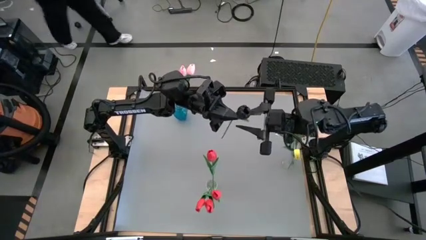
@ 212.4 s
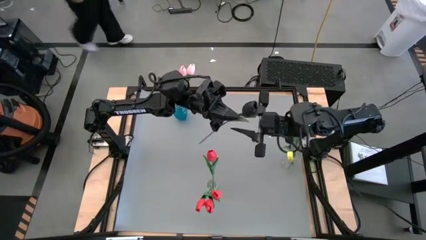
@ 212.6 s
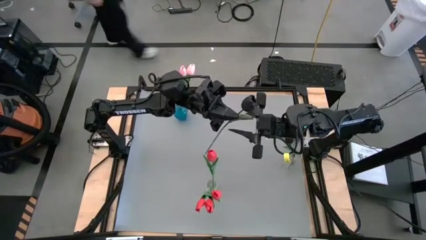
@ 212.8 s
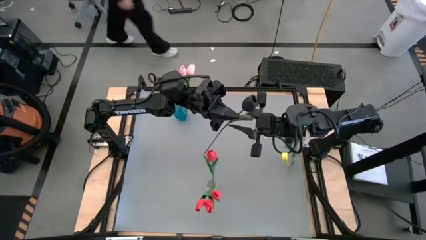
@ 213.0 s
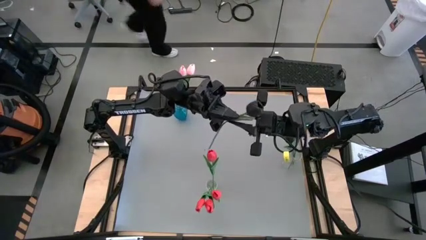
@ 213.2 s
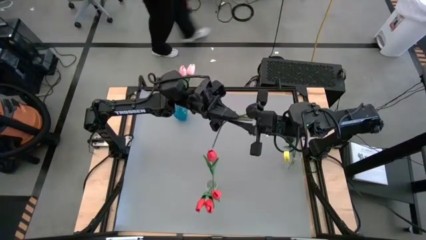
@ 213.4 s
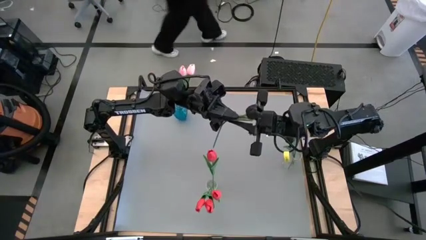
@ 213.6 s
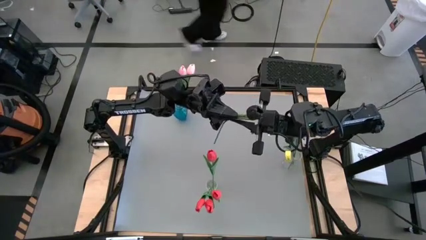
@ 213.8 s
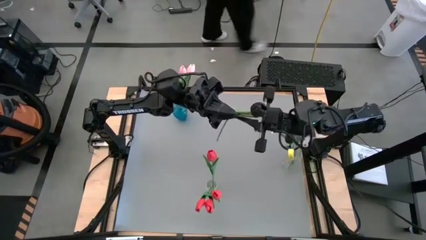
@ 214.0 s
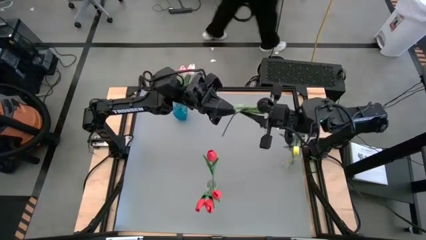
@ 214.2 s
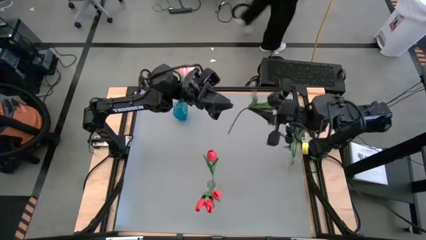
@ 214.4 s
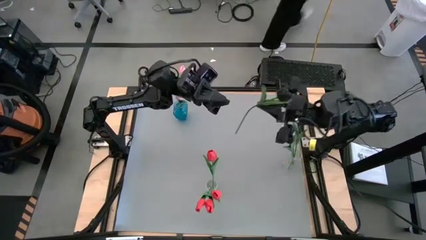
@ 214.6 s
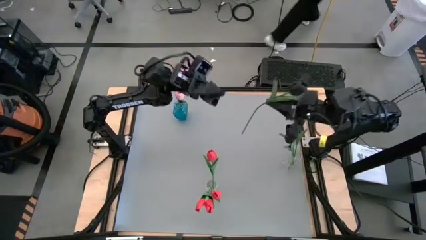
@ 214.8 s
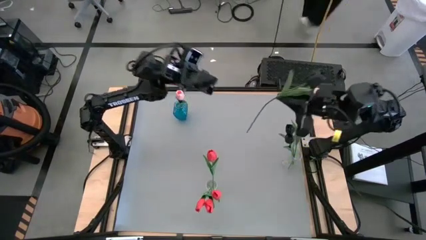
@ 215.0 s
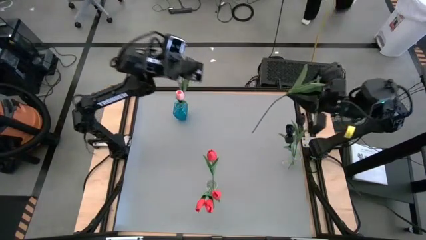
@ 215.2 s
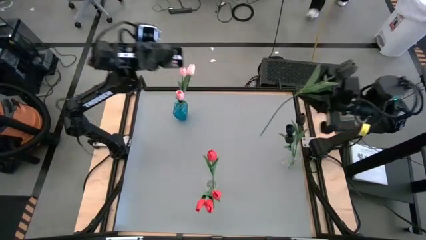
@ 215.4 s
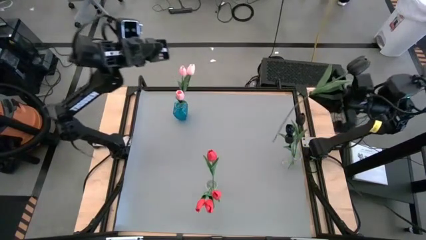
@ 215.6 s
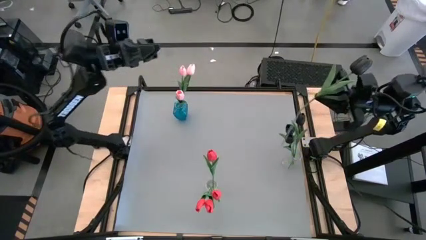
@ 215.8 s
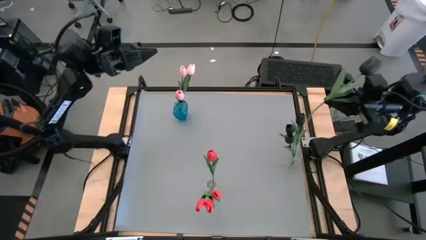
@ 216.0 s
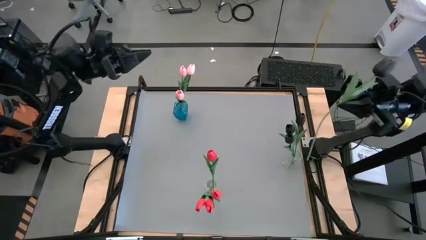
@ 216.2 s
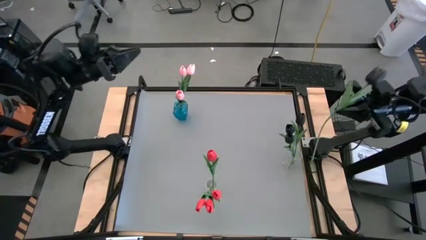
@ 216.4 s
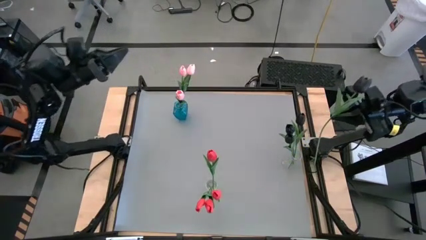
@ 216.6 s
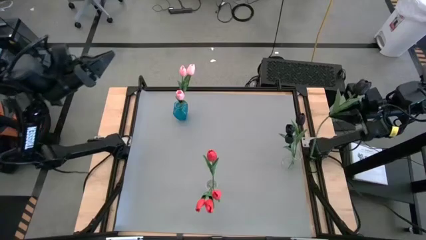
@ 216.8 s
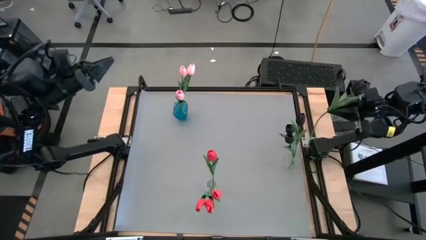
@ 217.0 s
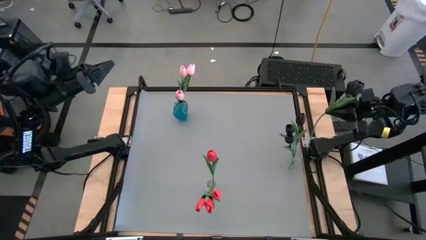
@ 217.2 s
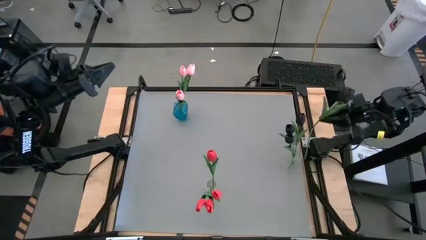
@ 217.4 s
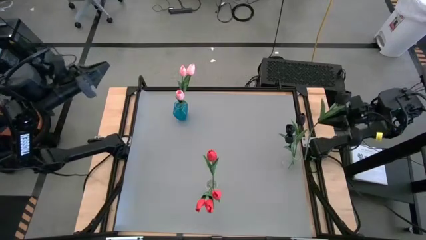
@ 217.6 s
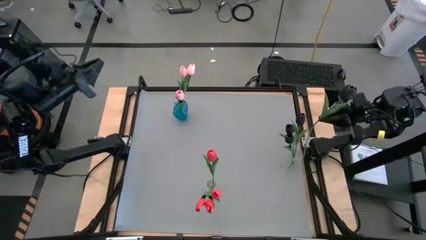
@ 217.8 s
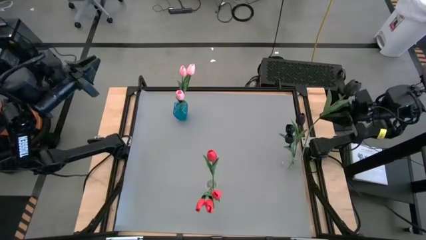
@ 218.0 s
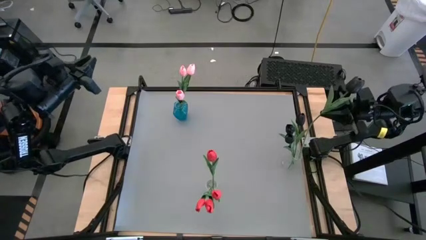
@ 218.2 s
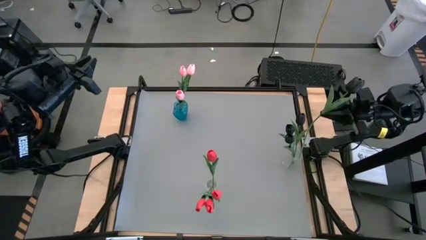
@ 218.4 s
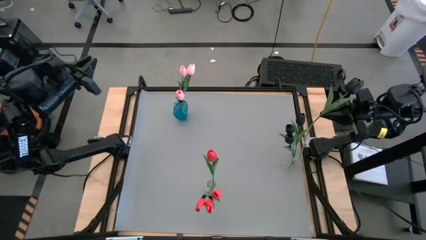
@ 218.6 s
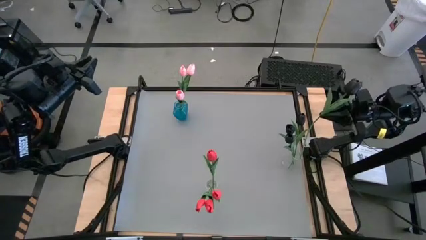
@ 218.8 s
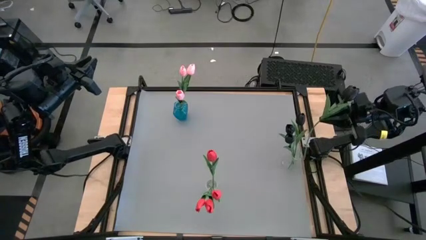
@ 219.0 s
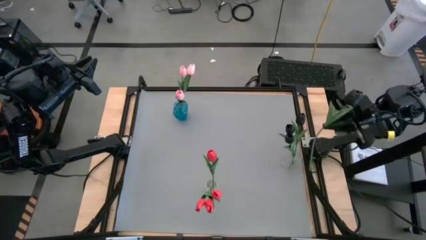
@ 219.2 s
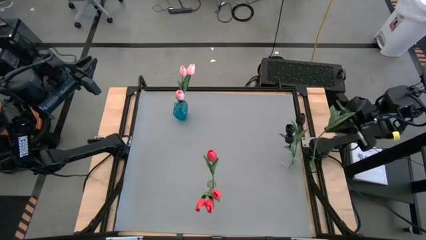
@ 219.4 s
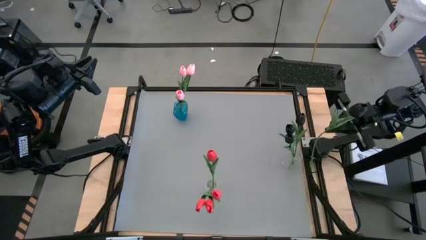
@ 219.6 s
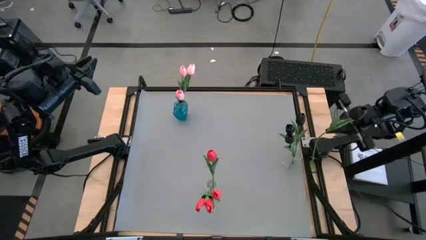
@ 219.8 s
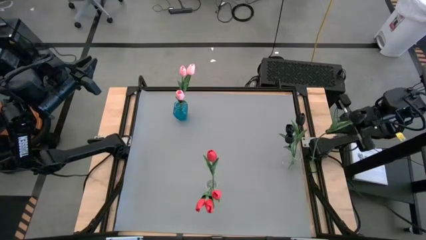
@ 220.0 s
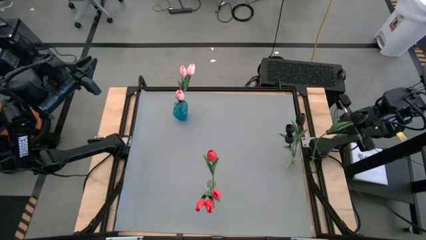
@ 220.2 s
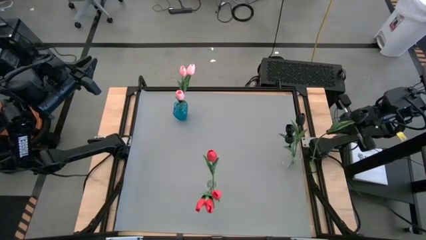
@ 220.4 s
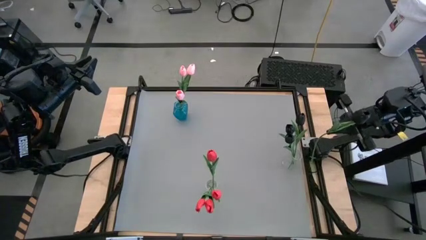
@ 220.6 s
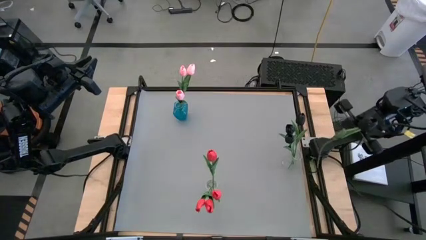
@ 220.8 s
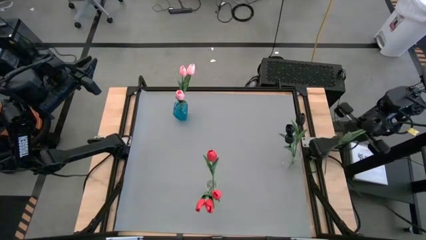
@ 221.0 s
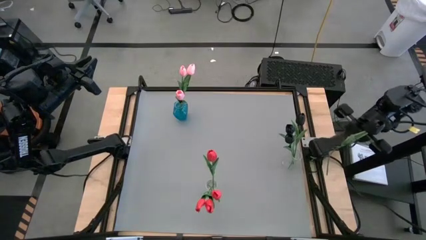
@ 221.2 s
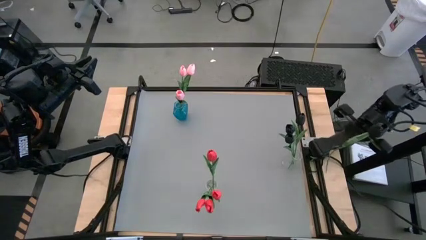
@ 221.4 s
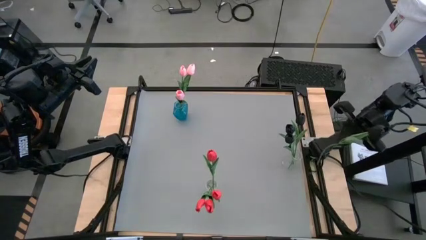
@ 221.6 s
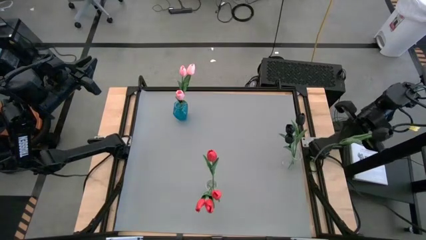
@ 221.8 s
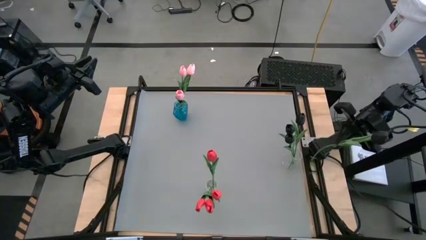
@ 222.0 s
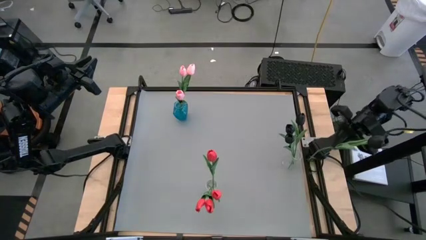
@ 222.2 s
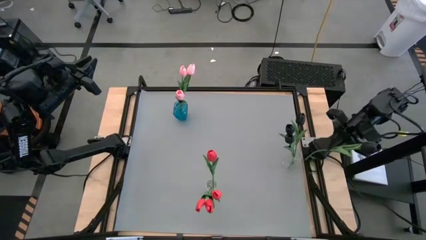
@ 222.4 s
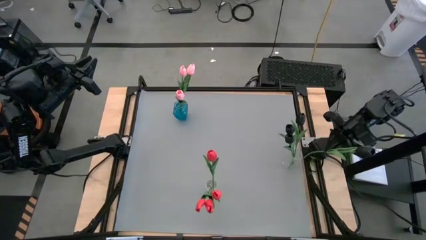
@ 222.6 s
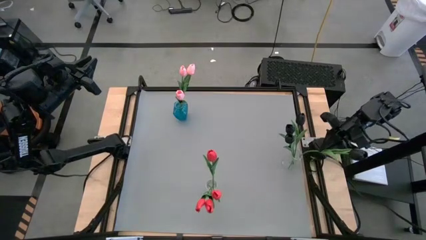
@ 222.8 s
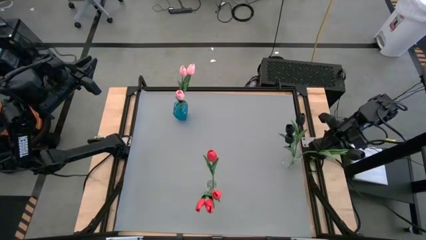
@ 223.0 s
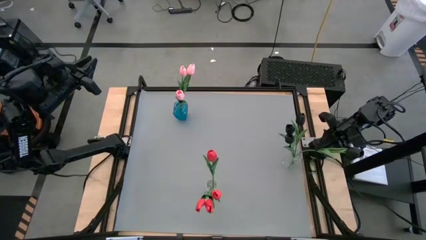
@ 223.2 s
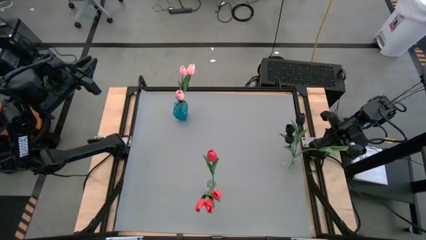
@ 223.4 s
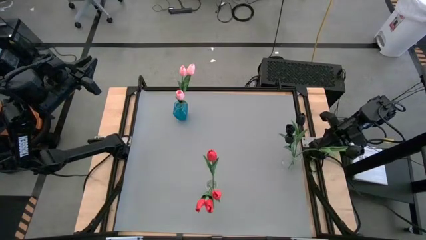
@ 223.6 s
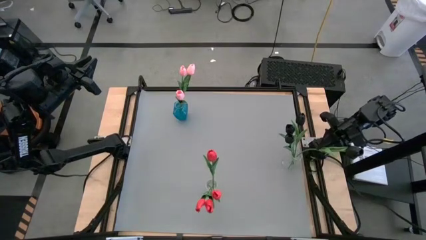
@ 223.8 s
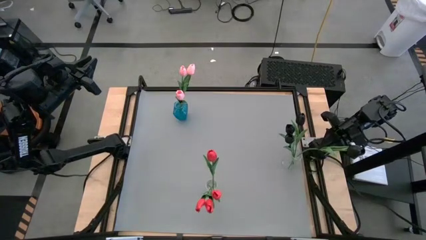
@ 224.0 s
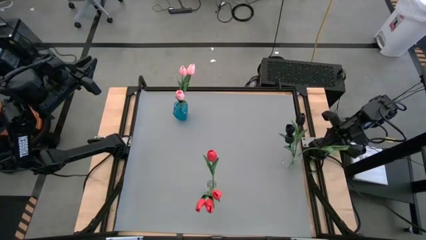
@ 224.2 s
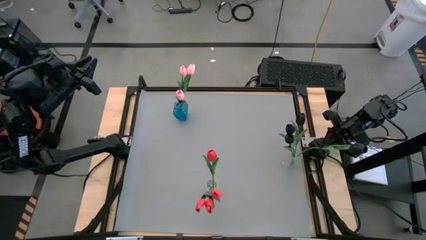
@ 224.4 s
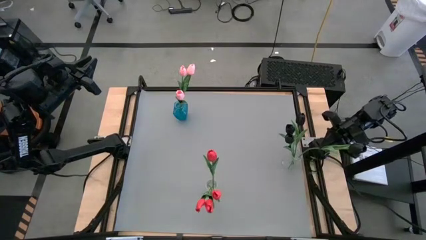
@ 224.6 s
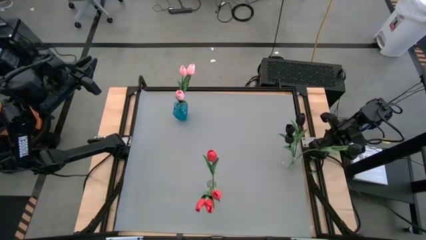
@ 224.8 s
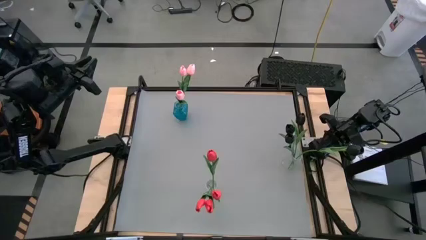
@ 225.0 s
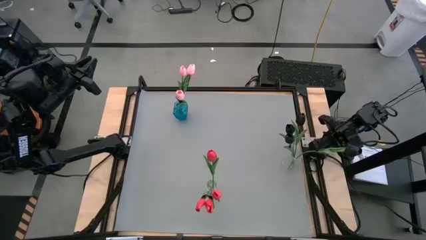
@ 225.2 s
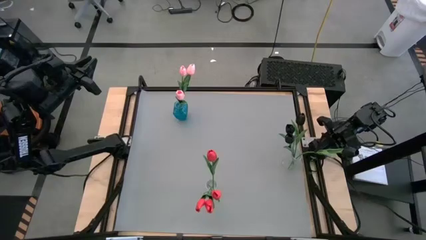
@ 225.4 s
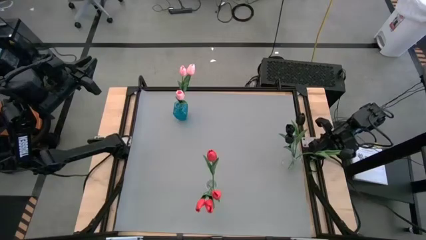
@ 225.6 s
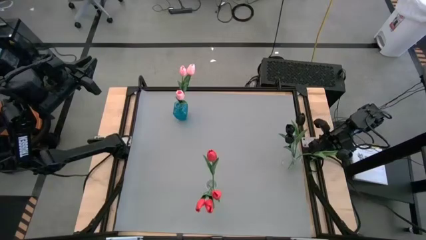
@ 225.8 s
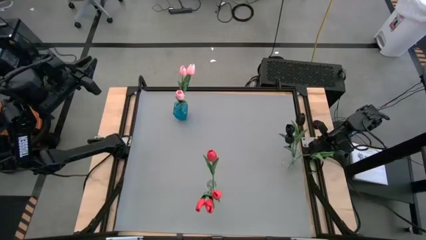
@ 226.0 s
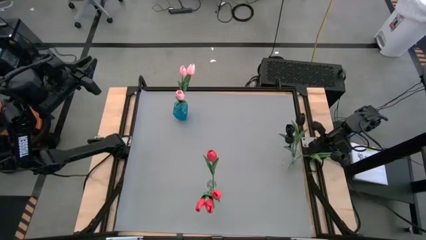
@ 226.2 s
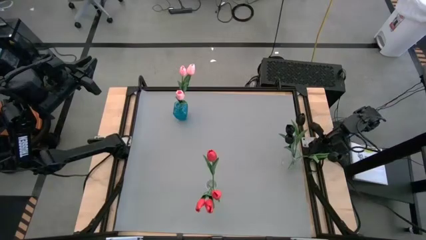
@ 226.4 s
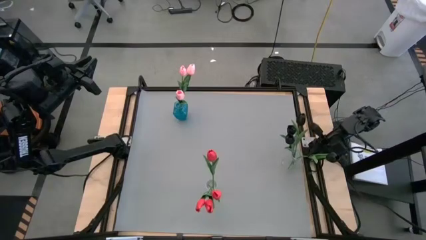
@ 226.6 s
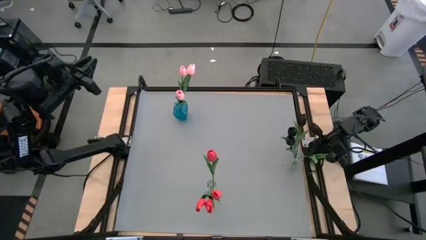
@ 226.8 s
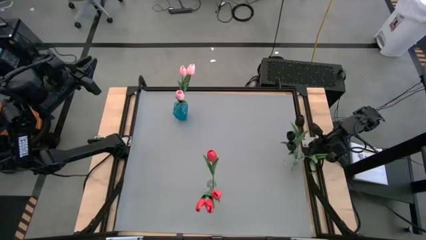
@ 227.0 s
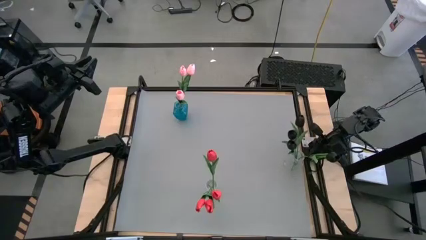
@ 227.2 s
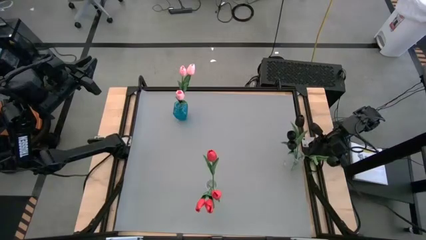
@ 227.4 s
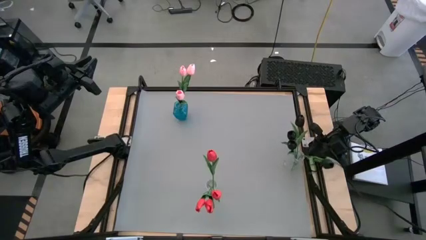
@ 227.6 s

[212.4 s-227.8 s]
Task: Sort flowers into vase by color
Put the black flower into the right transparent vase
